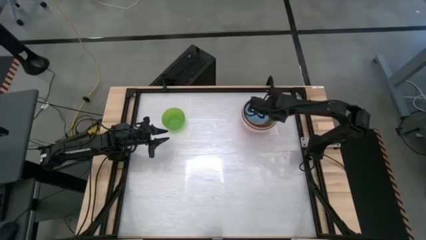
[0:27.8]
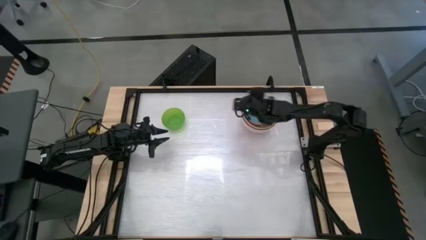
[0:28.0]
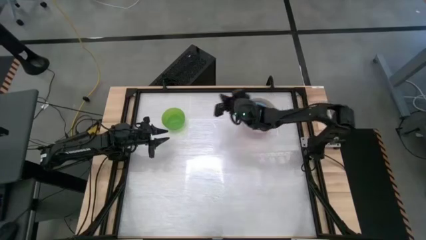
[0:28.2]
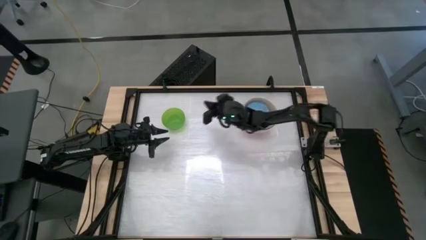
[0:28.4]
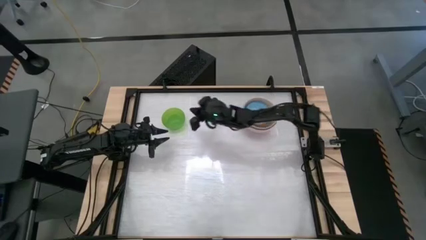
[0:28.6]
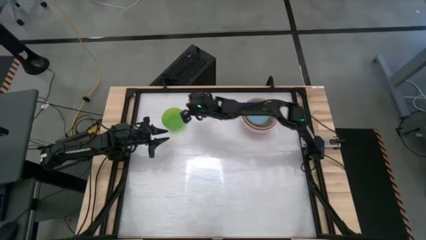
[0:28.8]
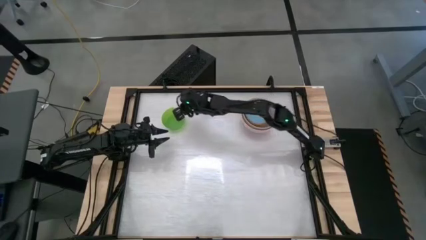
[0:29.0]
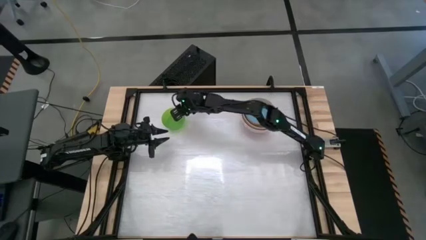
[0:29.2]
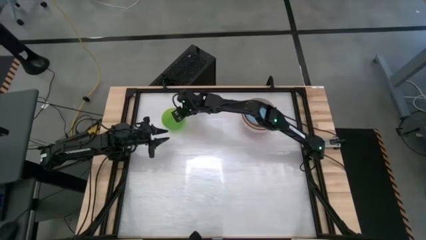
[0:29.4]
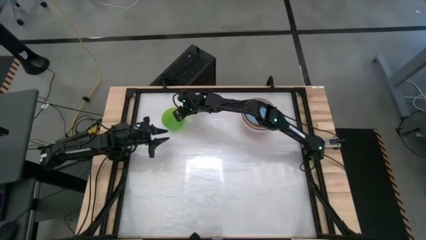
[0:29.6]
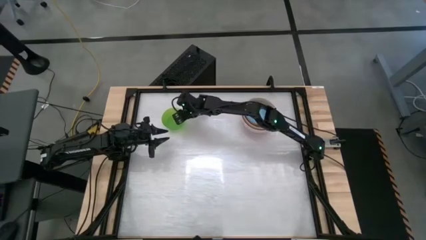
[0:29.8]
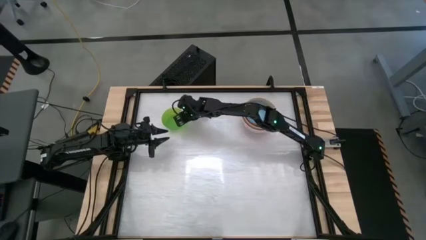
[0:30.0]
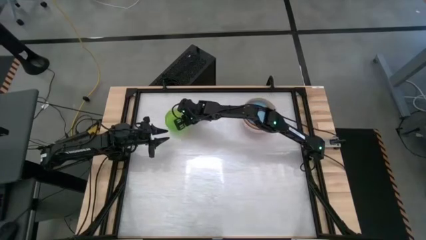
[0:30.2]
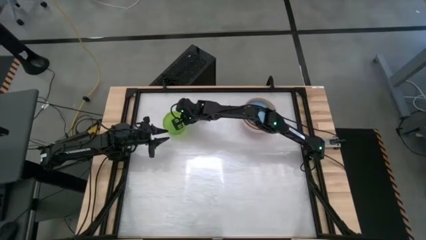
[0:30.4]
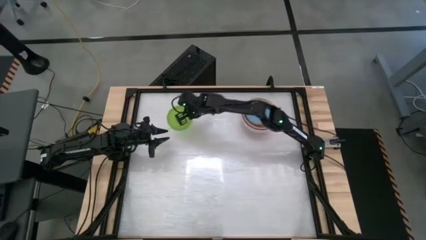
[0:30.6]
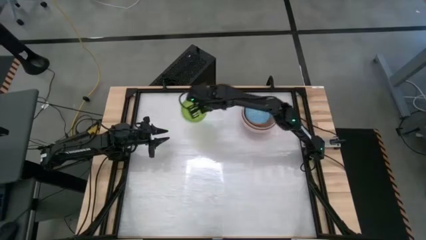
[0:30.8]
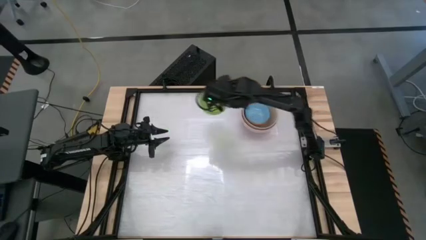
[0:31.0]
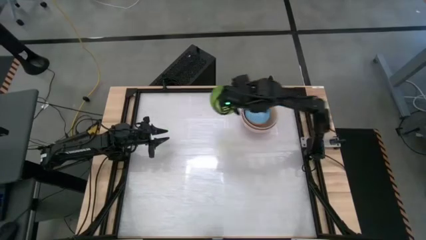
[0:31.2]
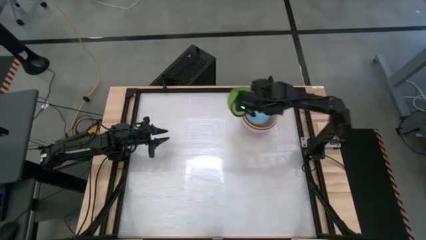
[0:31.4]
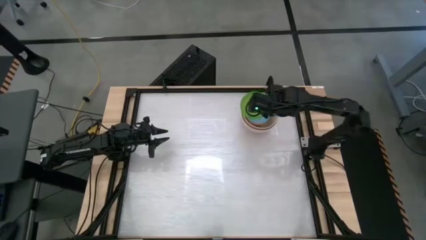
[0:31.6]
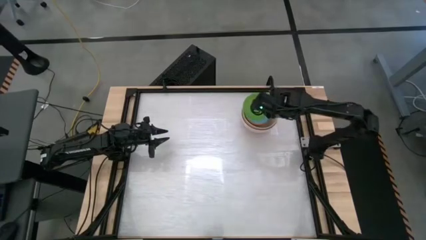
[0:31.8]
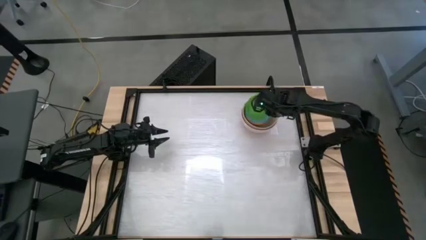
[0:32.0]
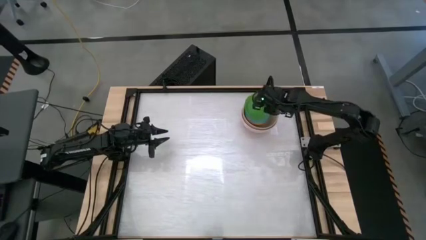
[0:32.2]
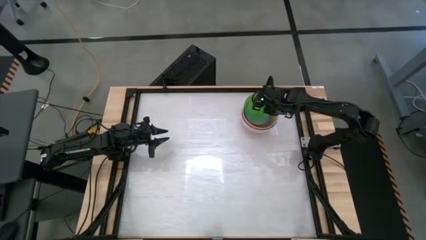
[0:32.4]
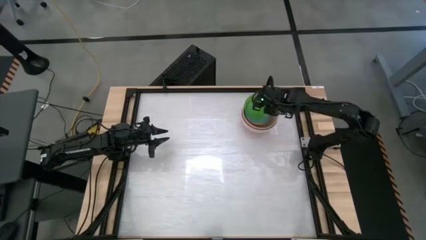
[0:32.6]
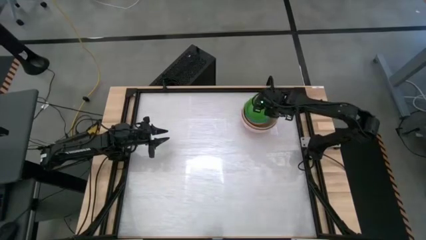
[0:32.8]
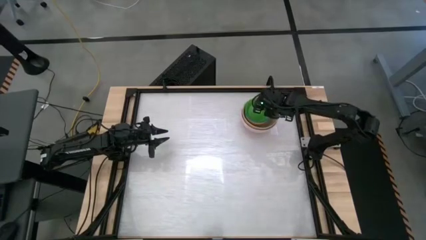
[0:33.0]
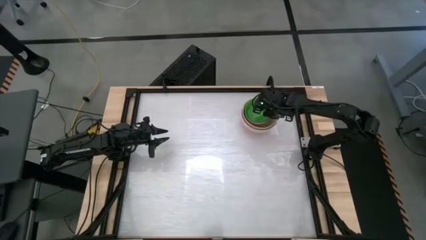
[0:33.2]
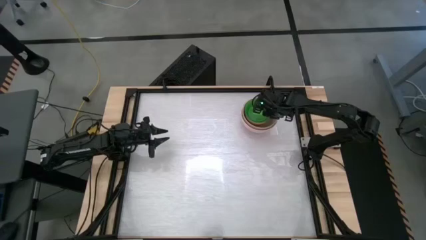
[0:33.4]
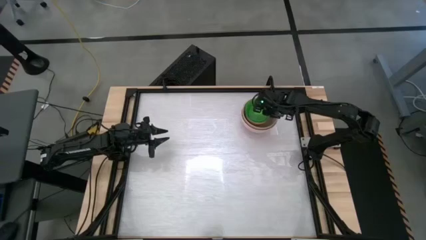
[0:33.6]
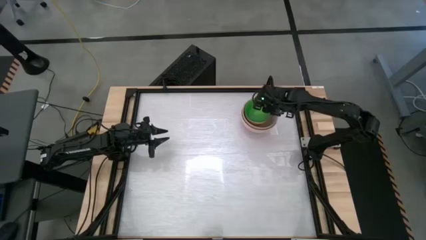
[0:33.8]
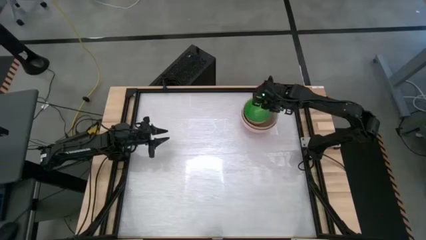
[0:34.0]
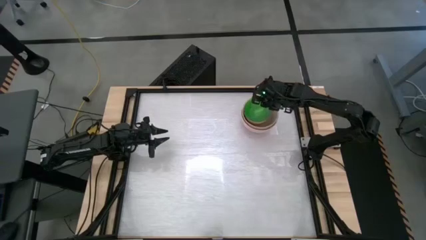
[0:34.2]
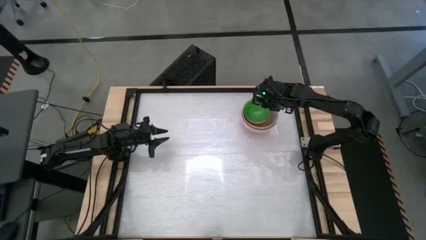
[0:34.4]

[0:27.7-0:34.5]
Stack the green bowl on top of the blue bowl

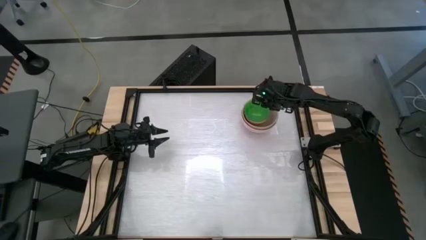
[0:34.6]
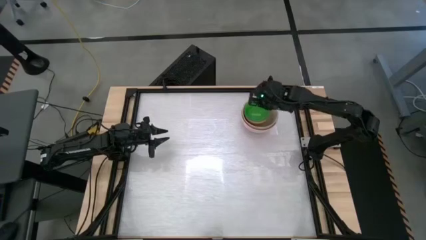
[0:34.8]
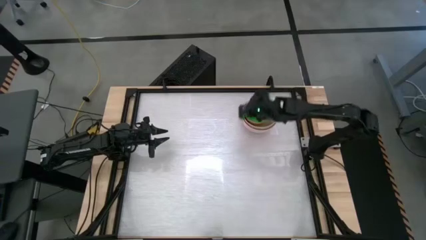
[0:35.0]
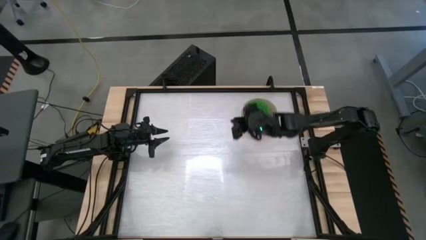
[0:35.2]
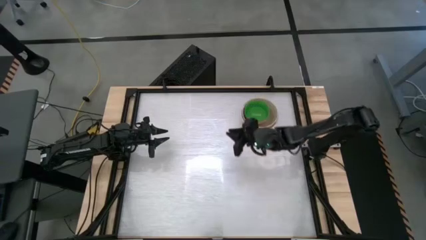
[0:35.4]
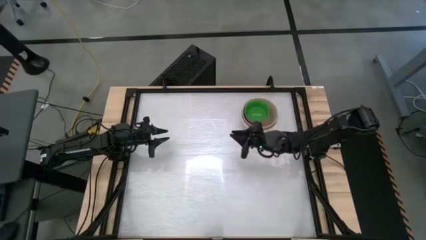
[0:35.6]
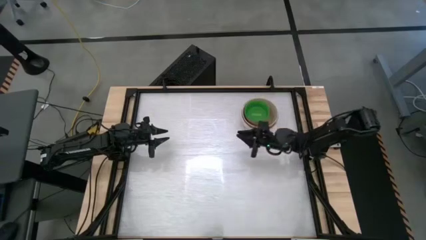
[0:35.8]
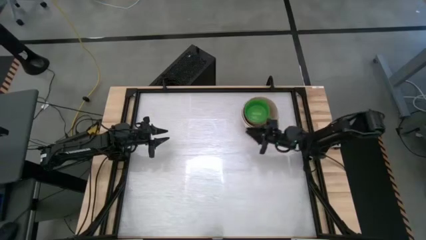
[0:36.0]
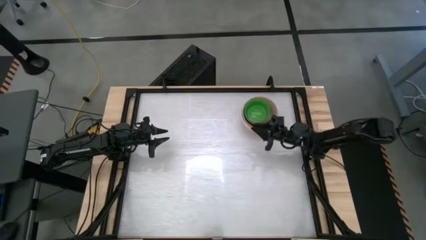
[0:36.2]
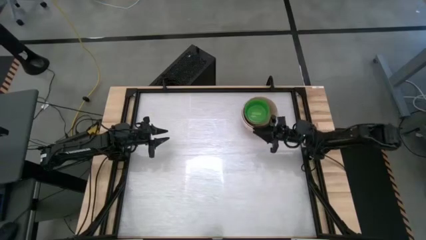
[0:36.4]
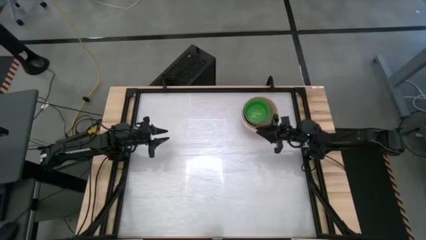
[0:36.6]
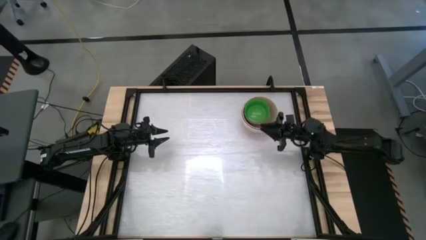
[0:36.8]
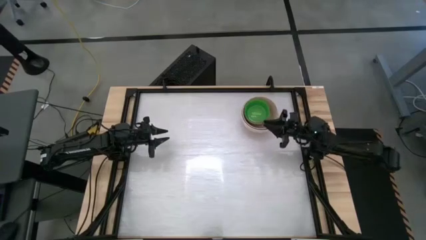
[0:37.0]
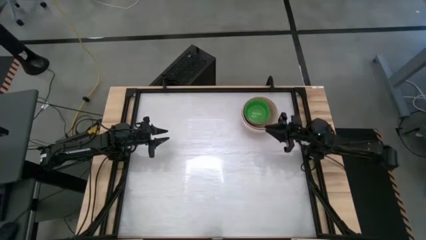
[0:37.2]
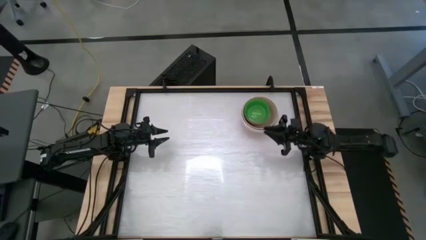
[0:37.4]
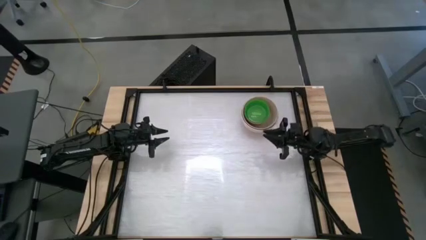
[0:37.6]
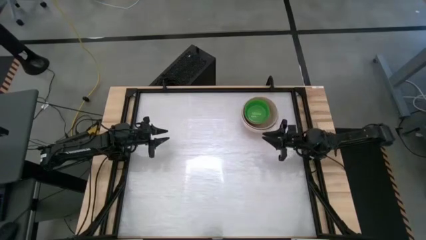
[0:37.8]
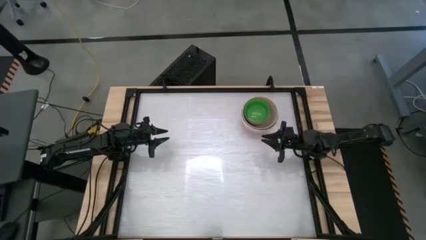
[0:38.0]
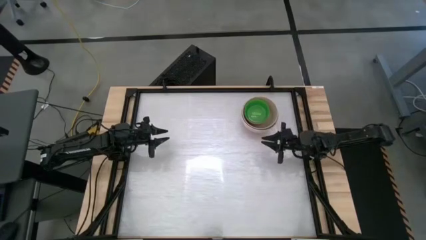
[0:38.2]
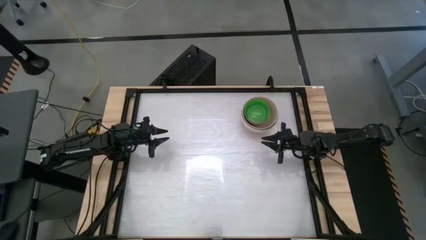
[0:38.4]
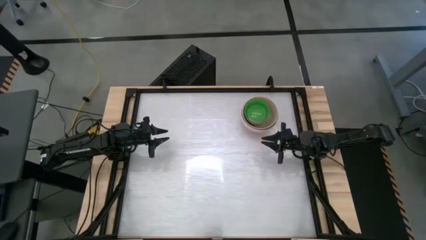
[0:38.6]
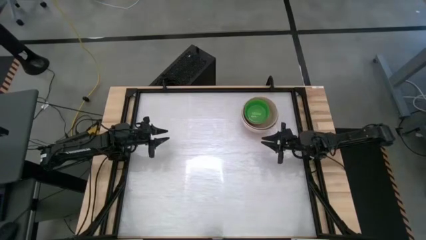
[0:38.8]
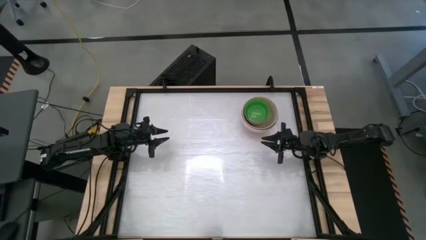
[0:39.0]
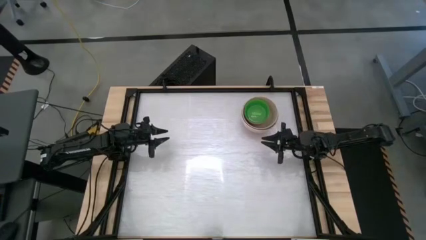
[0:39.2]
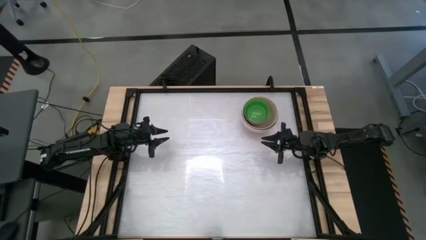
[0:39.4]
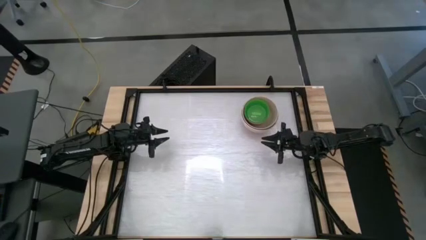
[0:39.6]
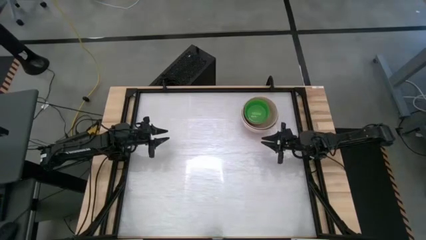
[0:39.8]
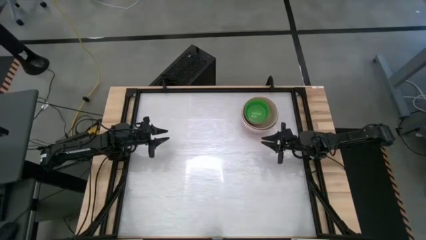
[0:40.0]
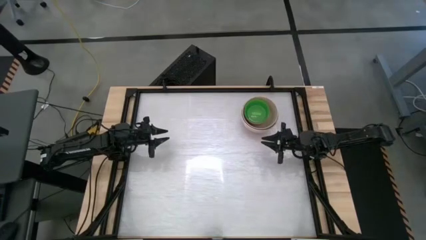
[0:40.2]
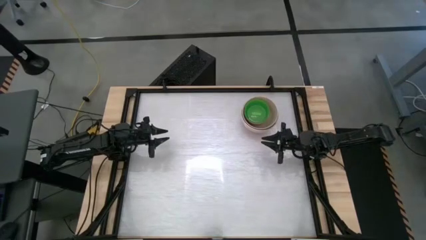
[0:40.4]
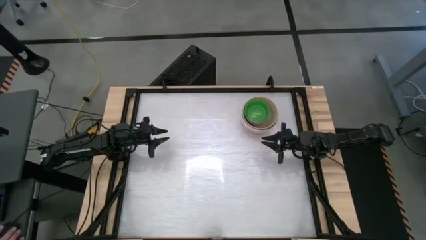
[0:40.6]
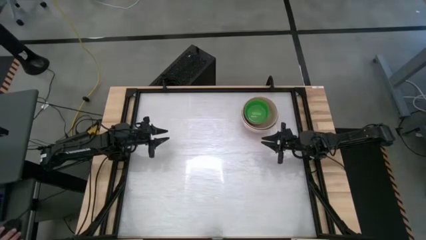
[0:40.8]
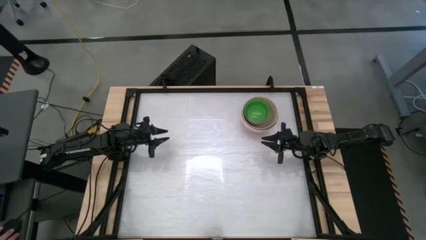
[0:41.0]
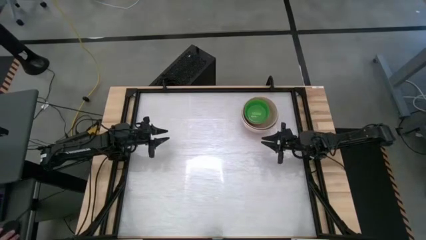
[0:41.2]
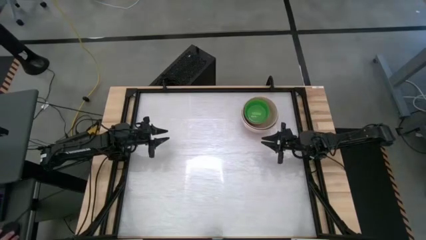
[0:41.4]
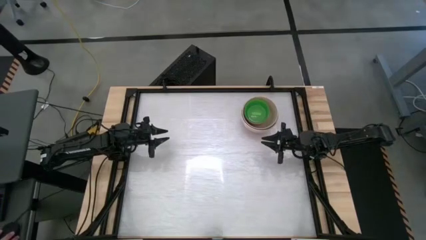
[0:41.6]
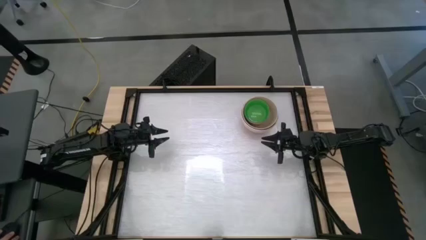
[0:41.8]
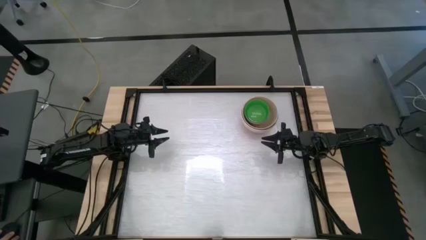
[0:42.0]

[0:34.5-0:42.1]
Return to Home Position
